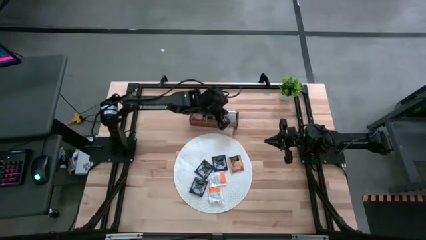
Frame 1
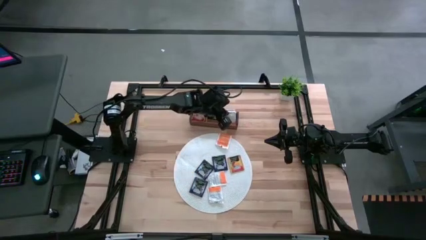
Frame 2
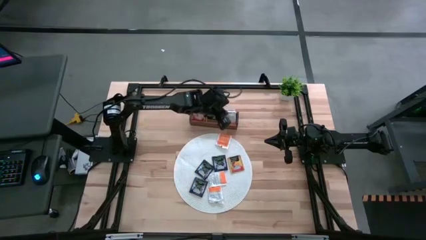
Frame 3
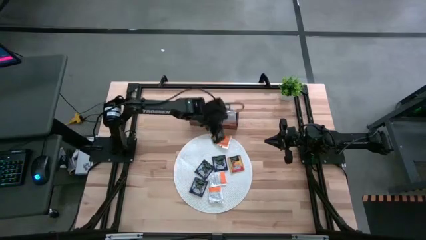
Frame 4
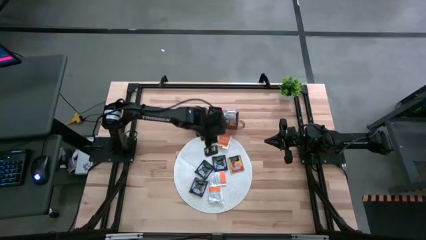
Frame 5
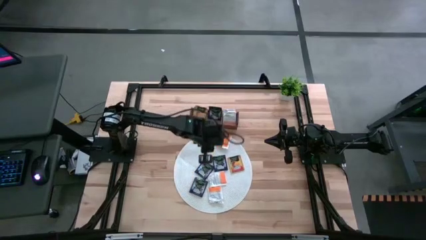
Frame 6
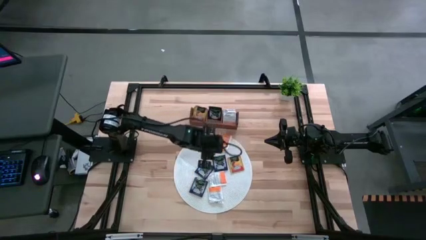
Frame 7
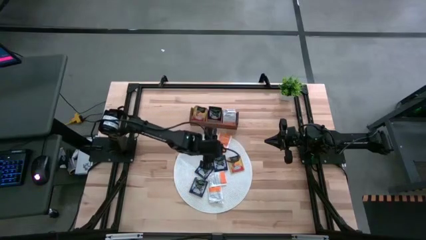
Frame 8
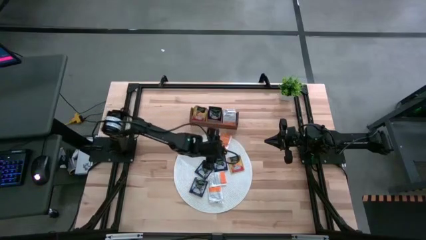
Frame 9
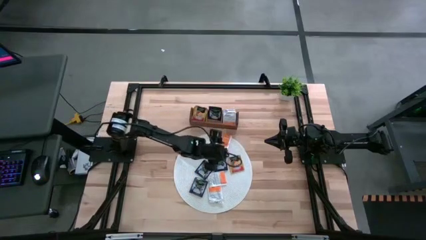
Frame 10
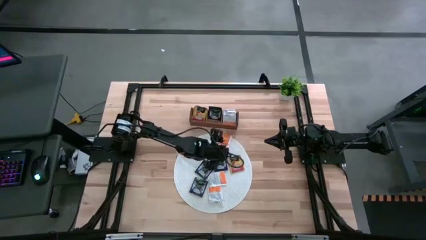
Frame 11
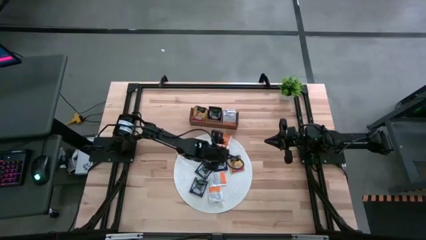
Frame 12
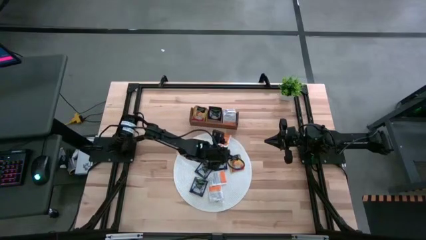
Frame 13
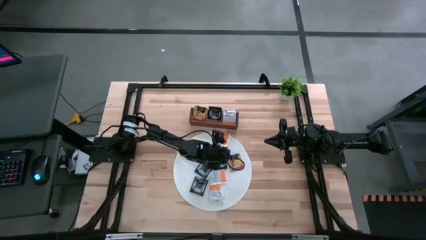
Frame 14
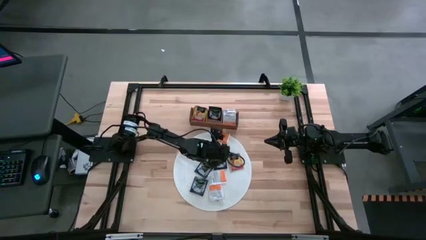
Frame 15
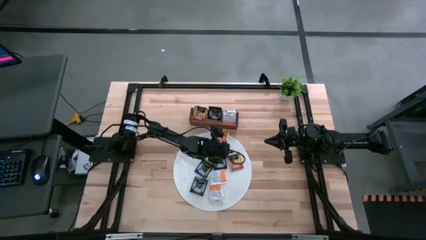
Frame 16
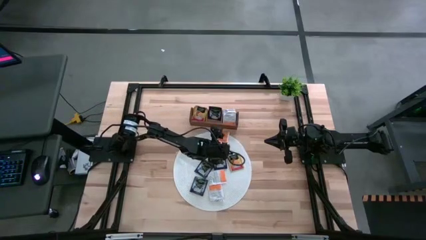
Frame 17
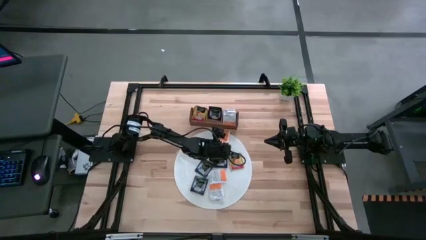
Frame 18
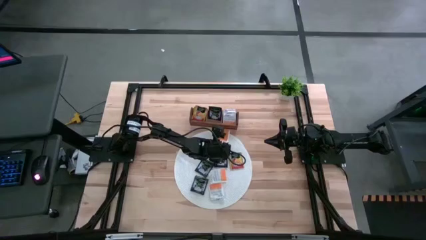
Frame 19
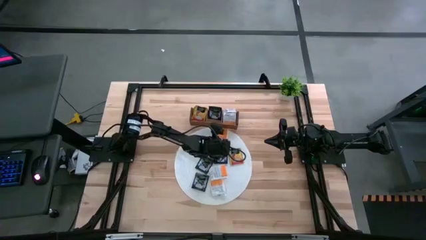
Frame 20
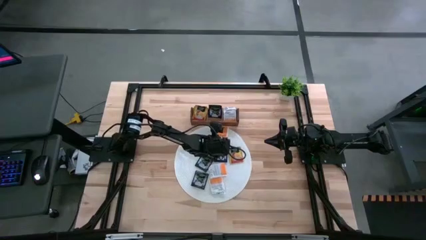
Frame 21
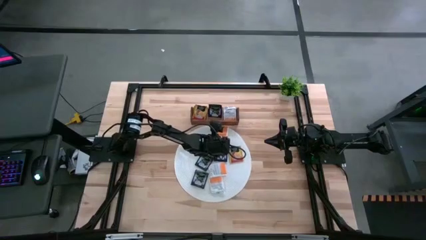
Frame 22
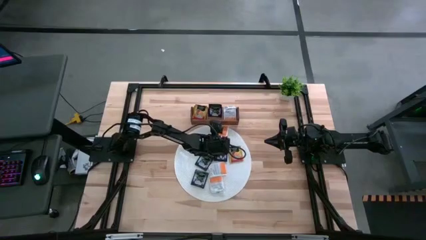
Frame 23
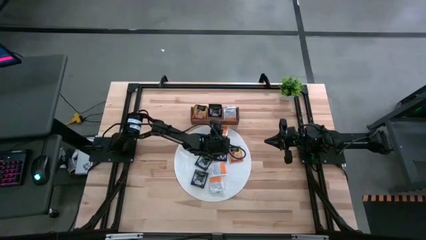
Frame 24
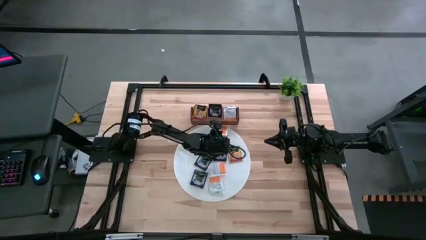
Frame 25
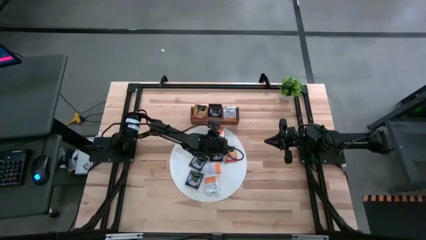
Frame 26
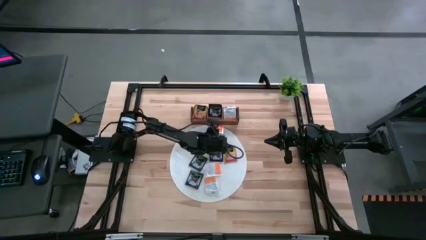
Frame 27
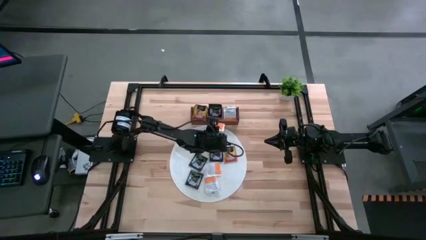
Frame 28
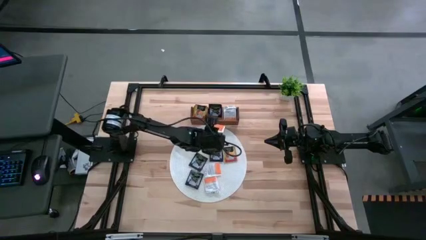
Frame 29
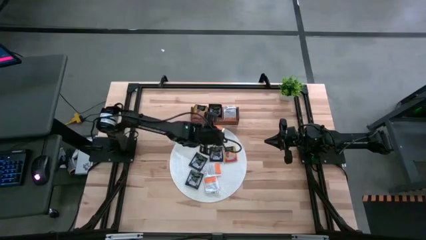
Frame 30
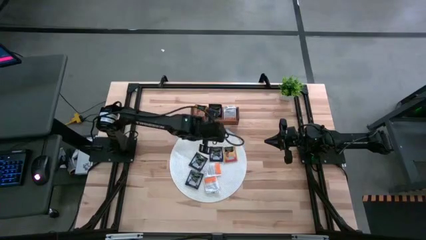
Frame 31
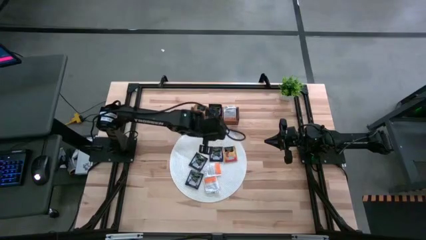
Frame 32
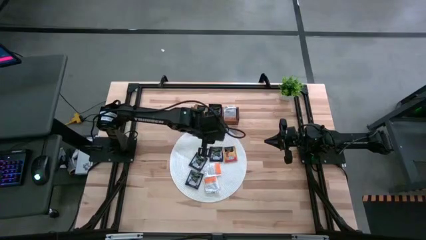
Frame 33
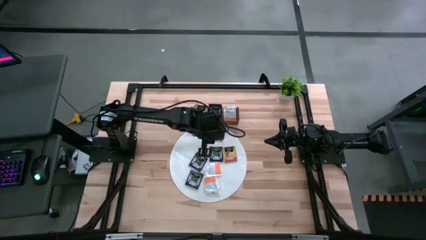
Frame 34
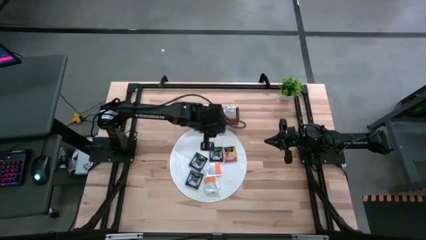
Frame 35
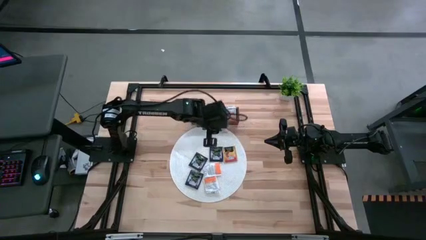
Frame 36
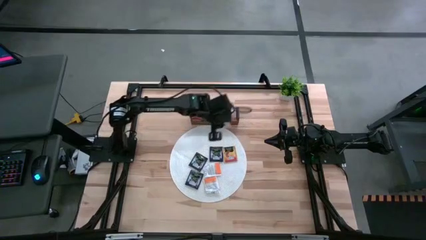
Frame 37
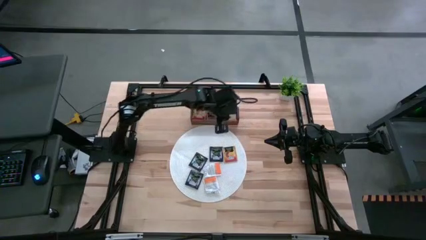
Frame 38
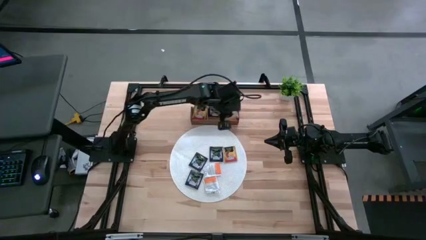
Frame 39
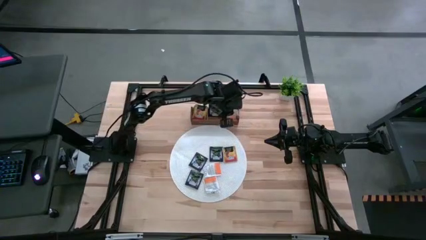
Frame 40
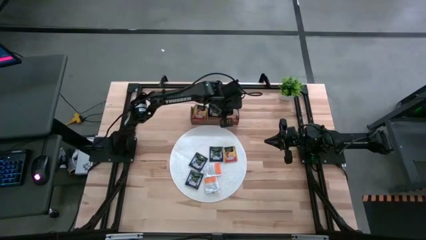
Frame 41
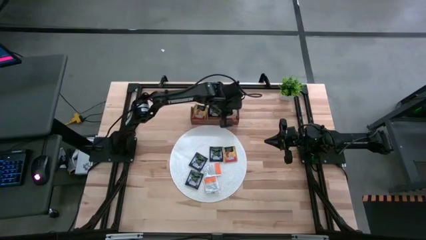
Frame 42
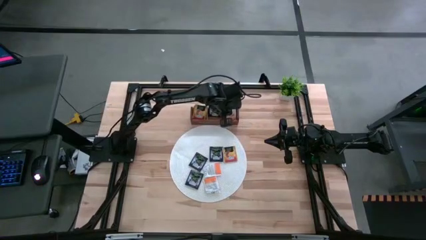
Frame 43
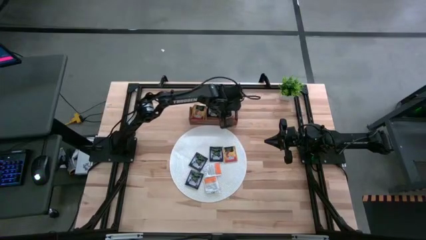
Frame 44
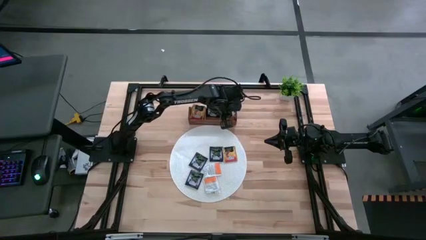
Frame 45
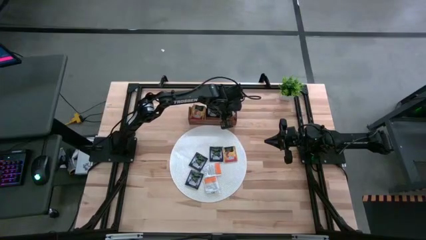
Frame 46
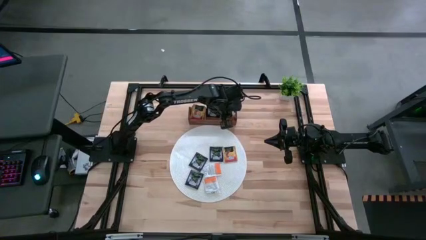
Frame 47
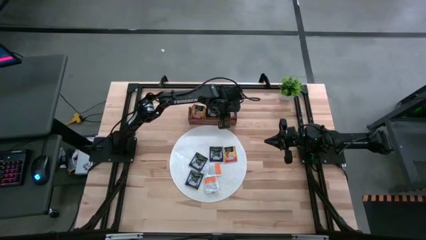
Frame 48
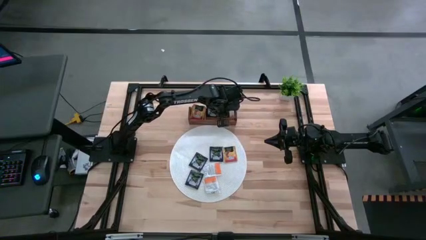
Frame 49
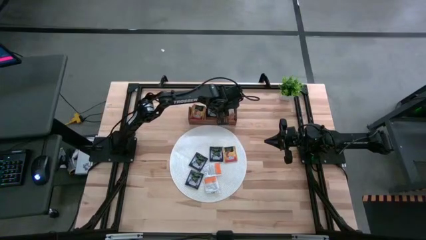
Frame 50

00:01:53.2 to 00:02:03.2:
Task: Pick & Place Tea
Put the white tea bag into the right section of the wooden organizer

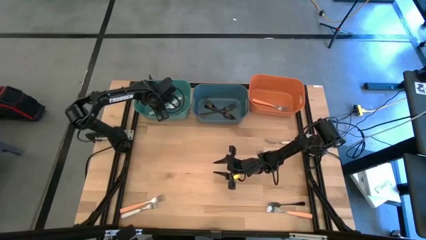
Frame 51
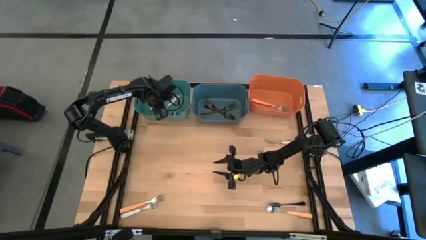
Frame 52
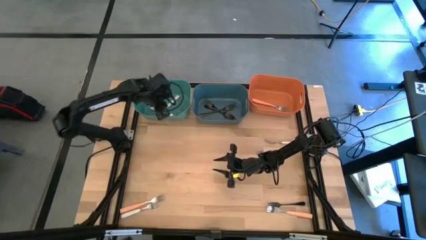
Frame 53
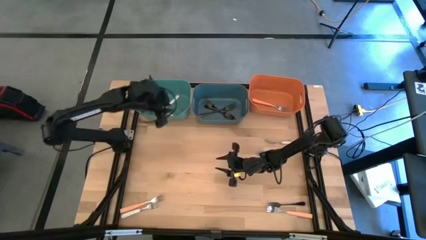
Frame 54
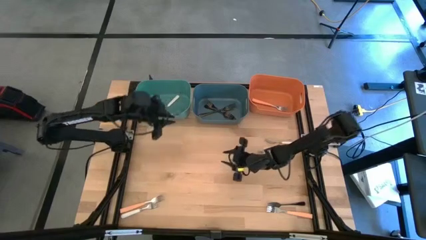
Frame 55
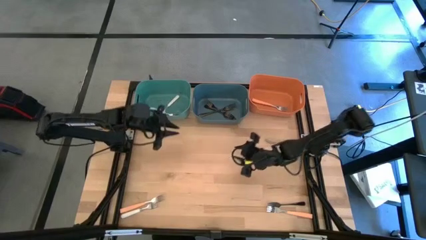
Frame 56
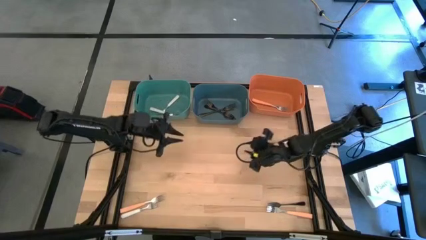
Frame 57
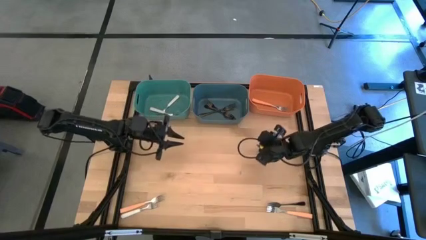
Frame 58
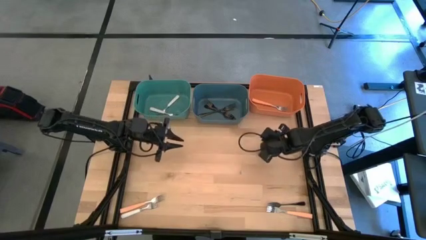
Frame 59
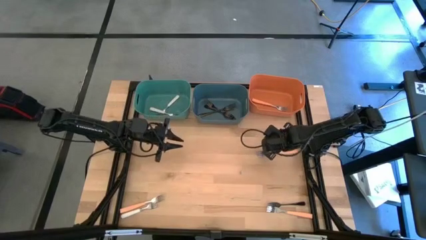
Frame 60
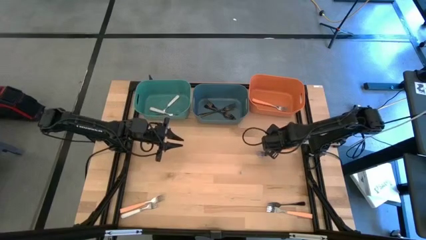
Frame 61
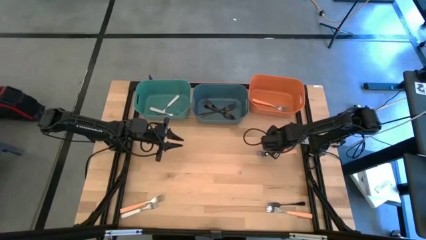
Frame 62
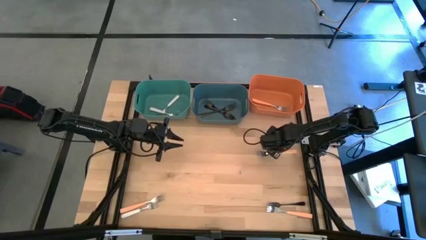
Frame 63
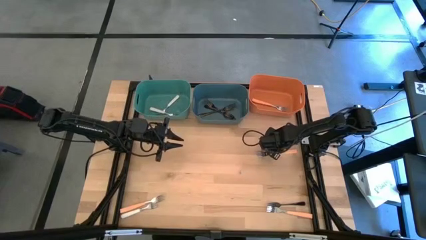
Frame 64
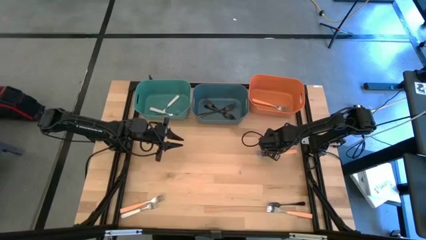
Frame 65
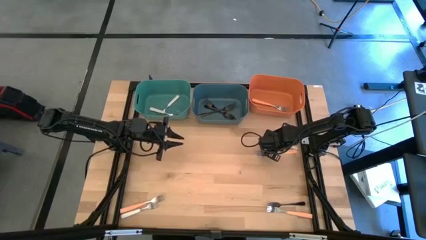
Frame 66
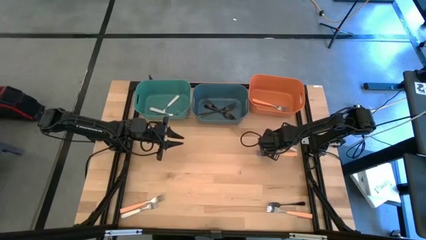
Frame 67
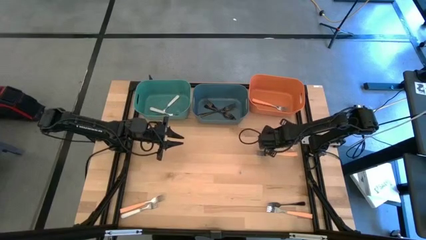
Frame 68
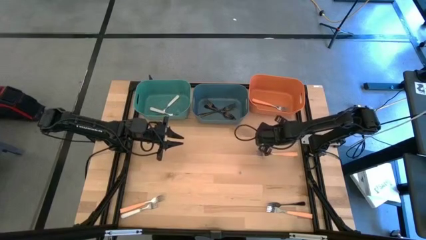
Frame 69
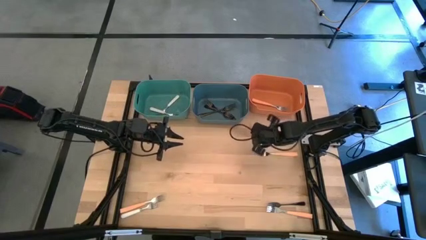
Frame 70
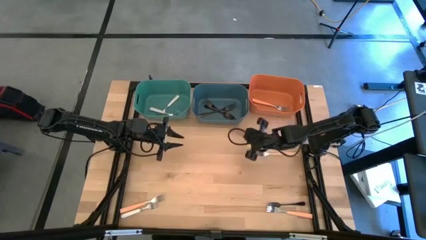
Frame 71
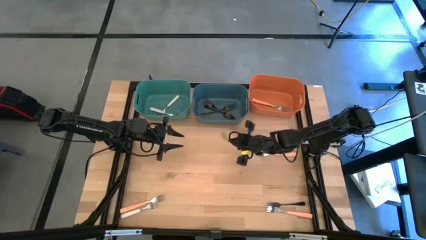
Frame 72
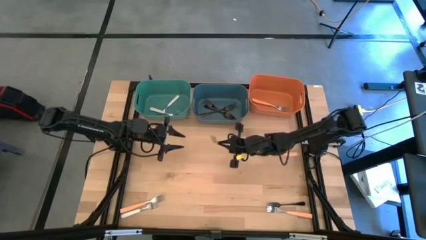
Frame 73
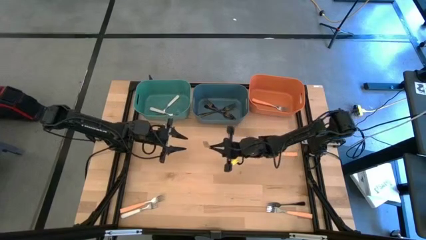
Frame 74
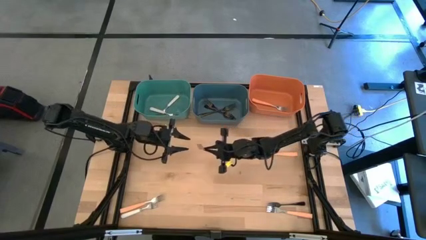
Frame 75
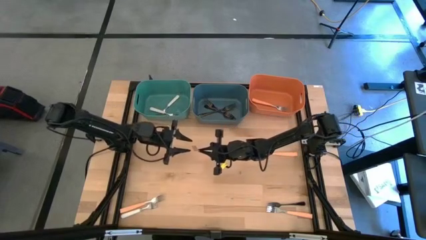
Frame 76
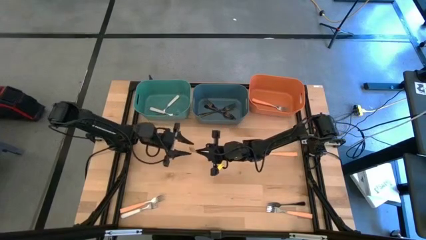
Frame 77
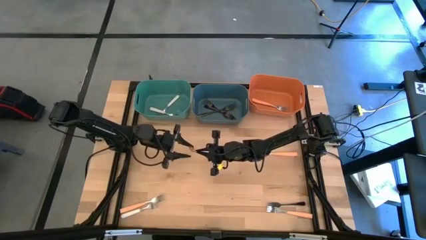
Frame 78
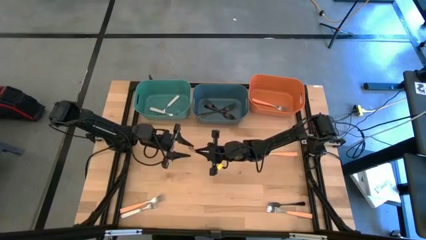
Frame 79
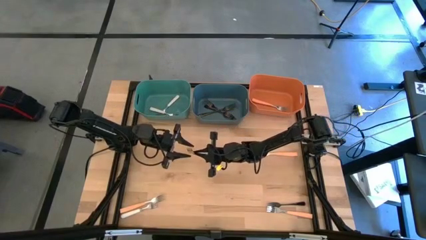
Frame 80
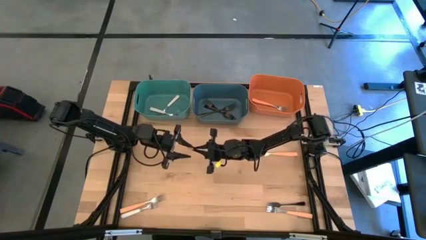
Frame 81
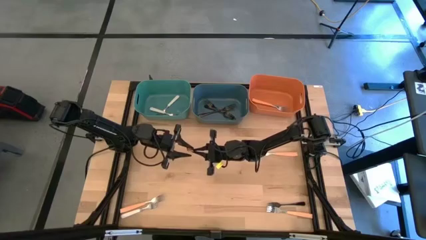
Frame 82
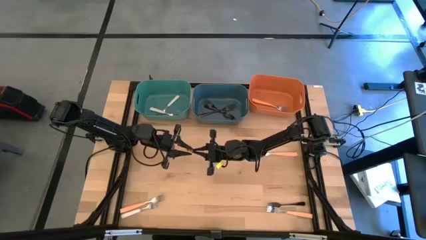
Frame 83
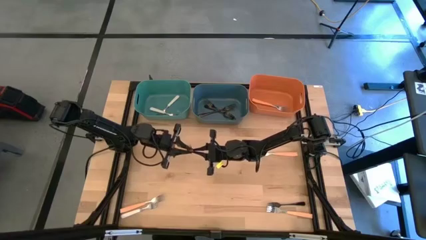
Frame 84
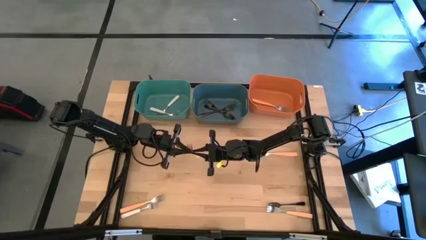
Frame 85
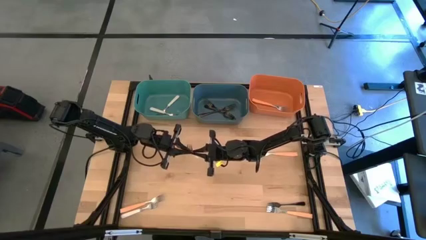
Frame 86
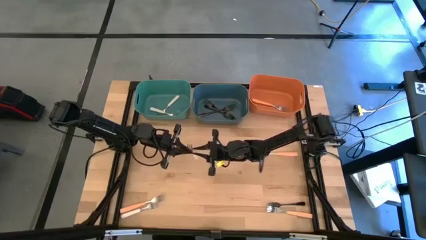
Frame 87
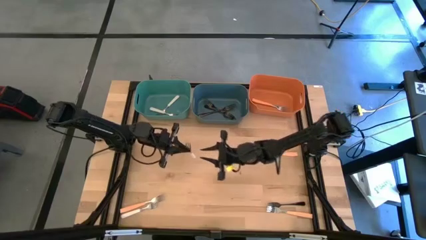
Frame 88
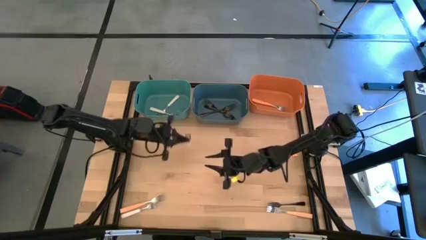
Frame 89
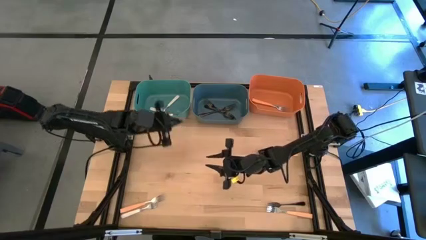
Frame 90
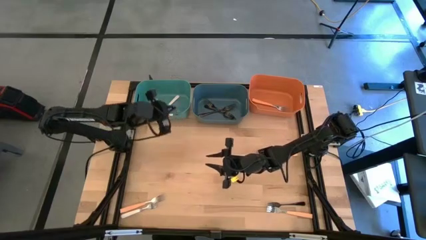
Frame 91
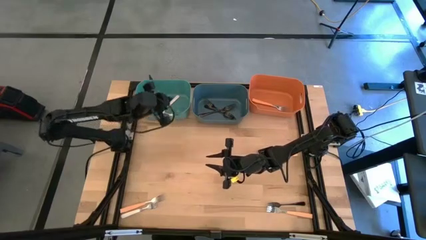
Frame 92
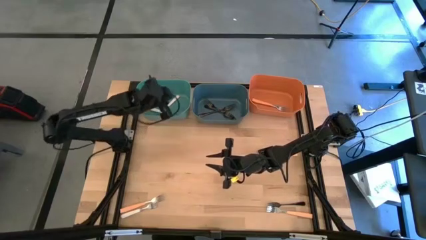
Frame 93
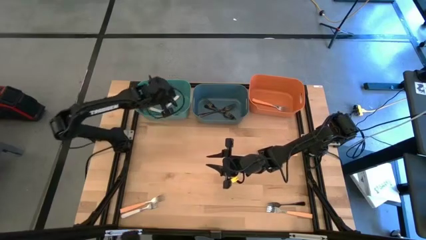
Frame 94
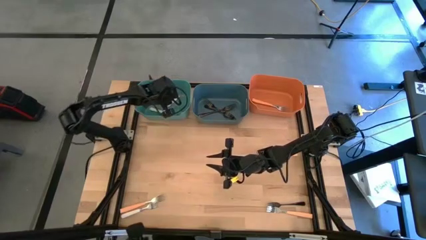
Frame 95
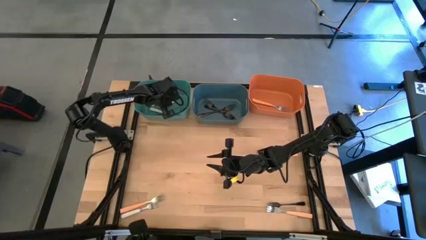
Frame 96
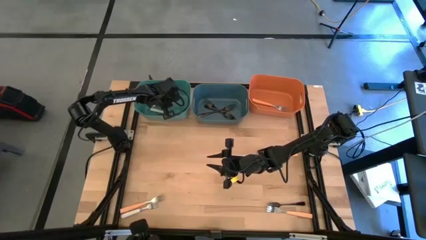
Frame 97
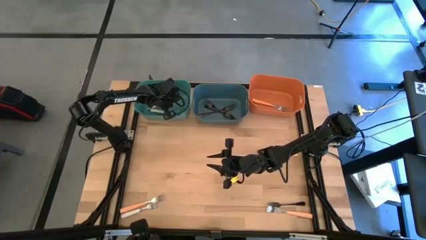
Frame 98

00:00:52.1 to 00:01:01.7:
Task: Sort silverware by color (type)
Put the right white fork into the green bin
